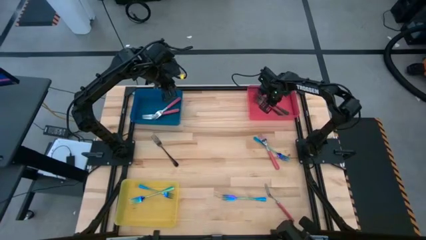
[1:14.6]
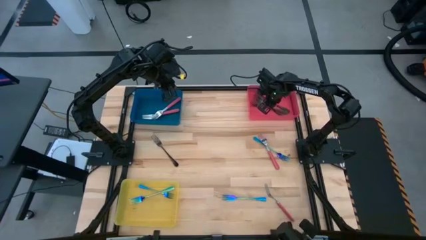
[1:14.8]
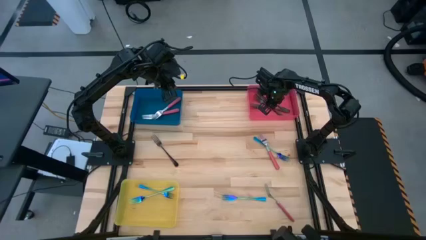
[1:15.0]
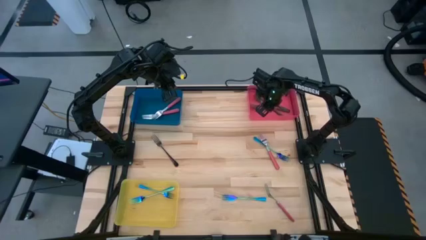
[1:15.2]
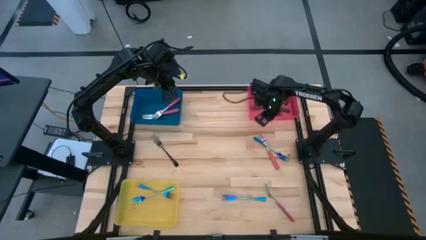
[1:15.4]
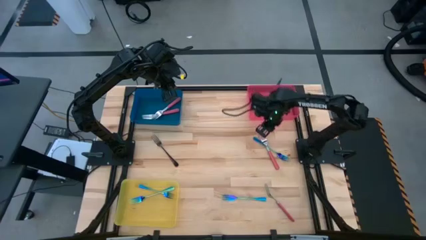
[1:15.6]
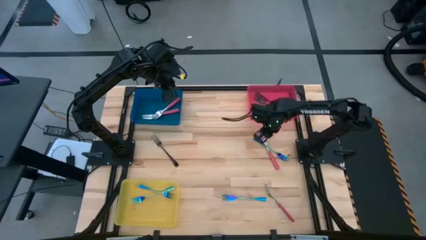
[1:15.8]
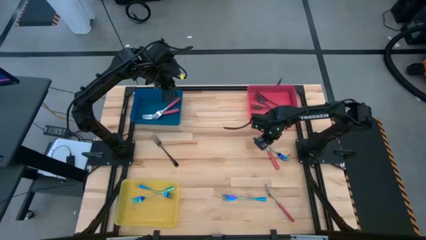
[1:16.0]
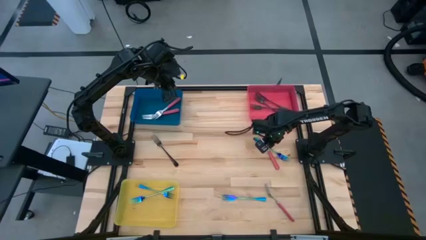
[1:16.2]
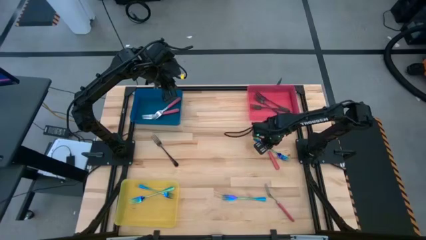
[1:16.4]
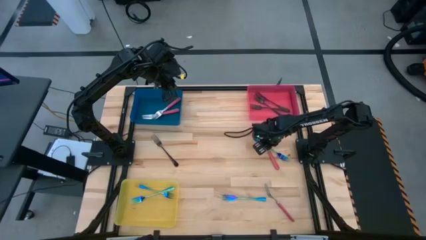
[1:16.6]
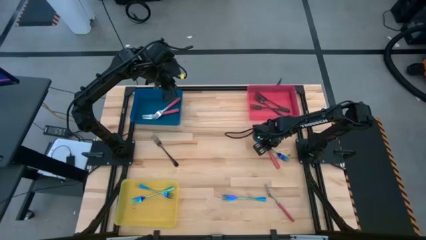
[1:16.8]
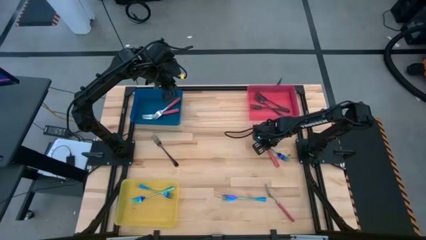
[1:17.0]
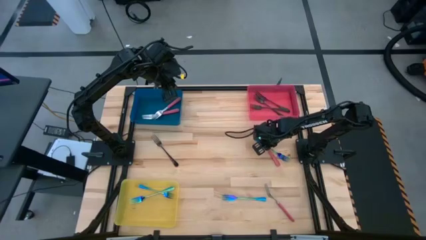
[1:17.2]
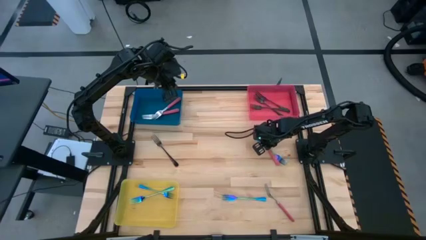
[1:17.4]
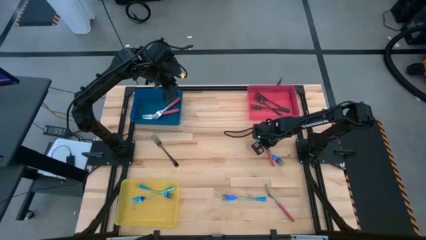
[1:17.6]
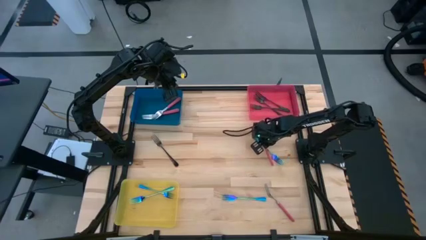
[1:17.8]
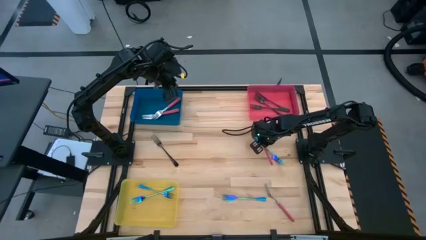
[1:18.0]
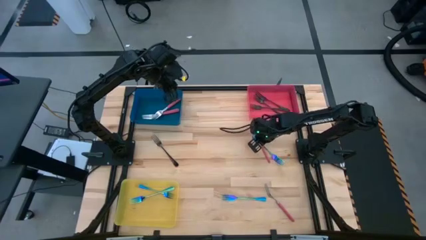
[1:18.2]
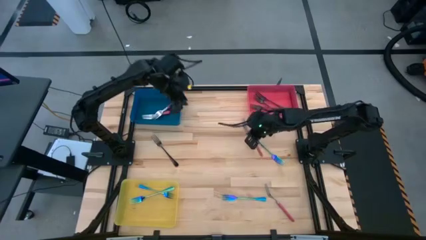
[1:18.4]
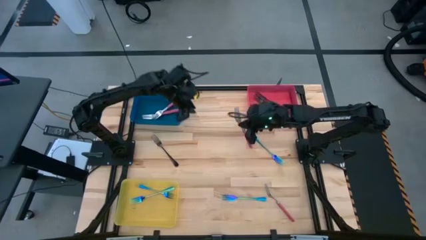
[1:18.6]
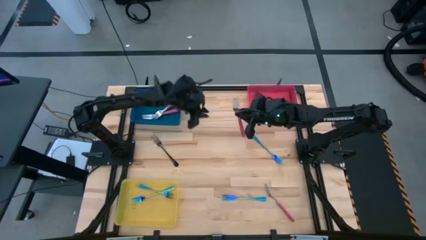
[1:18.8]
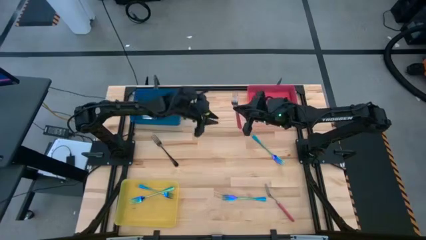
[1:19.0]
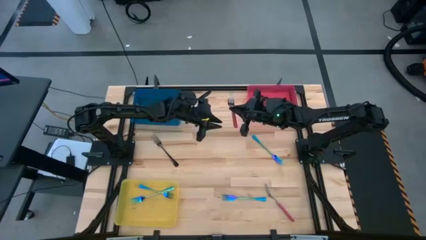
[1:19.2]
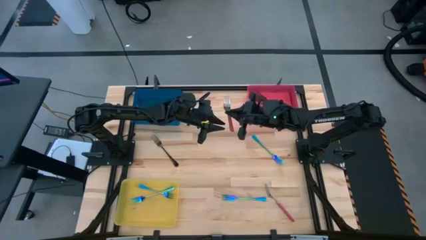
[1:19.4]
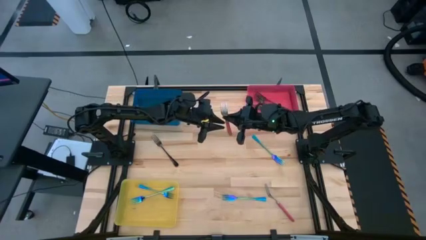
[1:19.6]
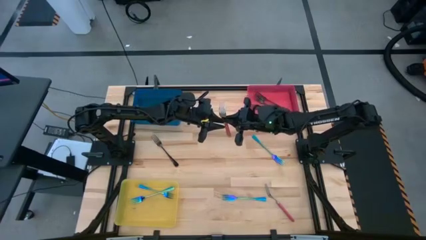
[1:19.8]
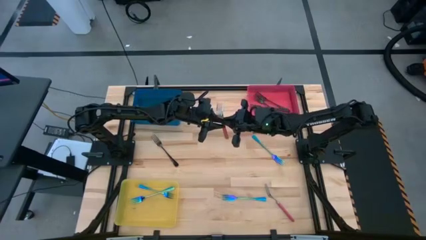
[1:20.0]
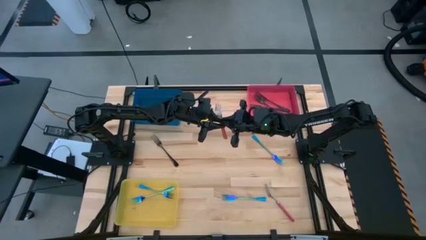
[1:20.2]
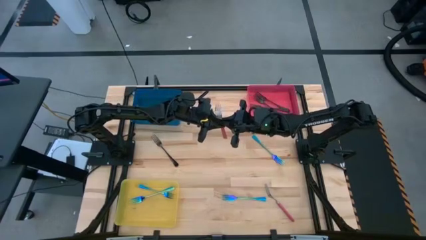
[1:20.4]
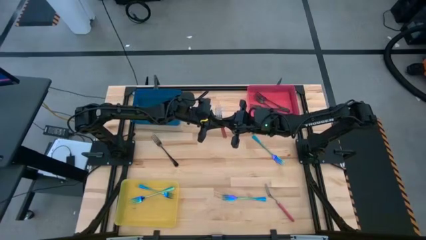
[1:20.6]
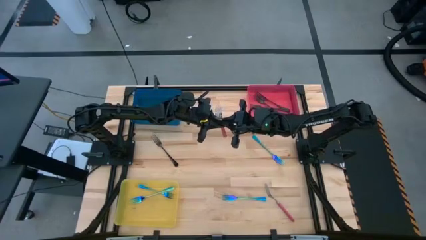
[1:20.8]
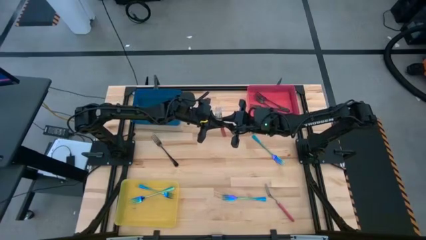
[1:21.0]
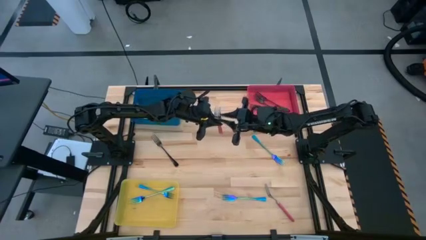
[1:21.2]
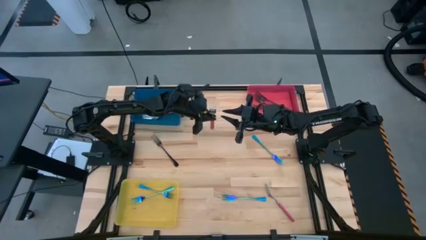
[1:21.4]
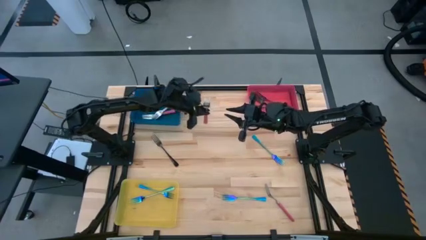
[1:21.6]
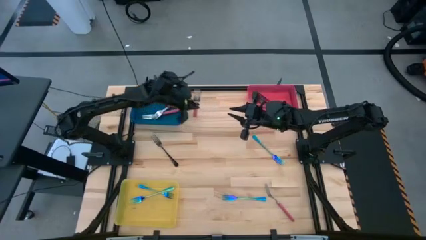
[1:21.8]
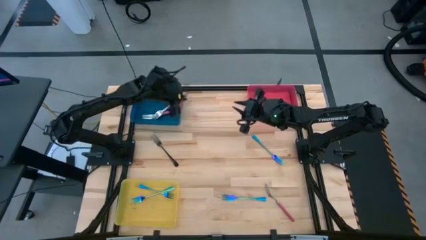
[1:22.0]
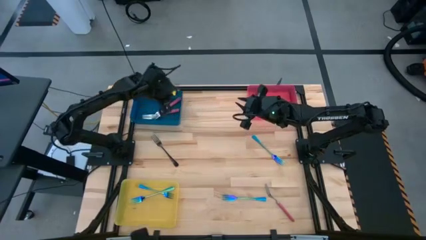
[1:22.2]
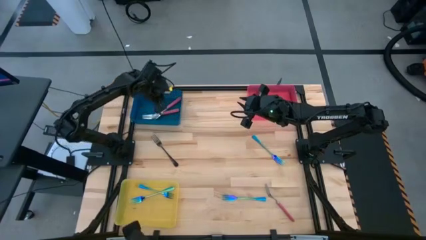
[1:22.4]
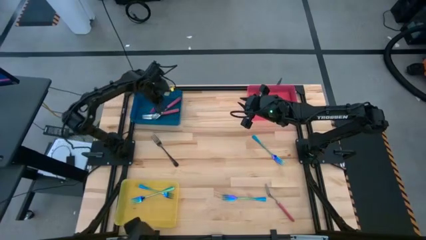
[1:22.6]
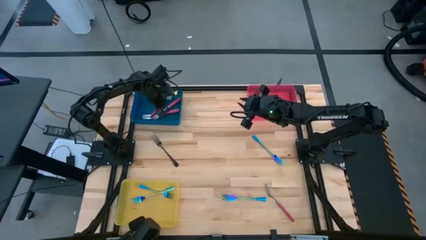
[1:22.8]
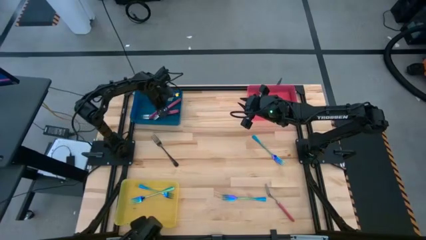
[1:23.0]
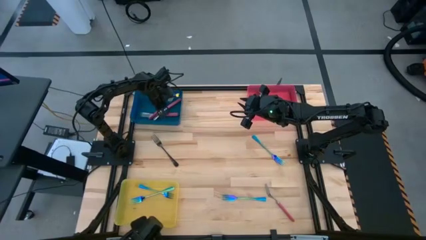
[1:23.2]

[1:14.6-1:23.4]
Task: Sort silverware by color (type)
Put the red fork into the blue bin

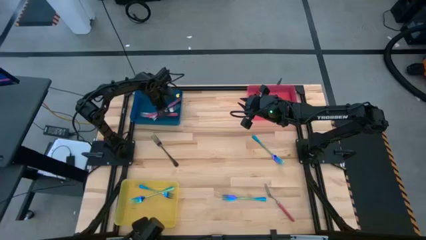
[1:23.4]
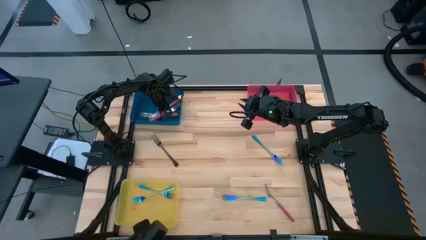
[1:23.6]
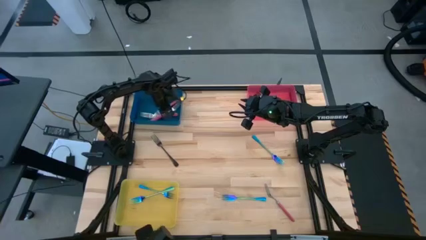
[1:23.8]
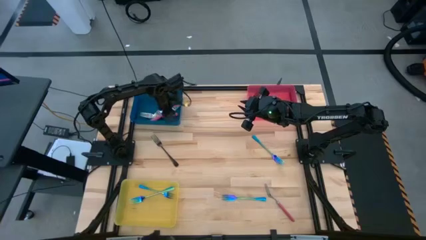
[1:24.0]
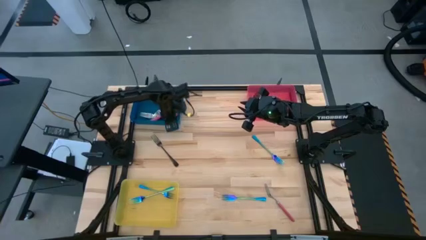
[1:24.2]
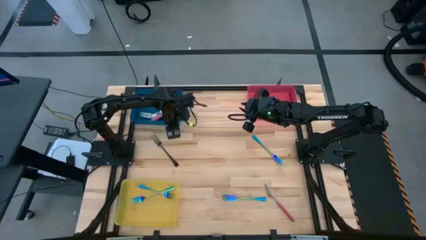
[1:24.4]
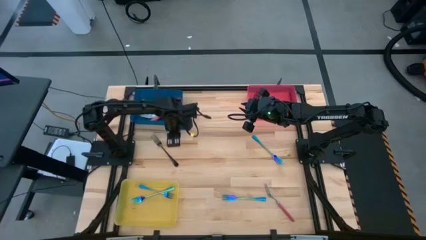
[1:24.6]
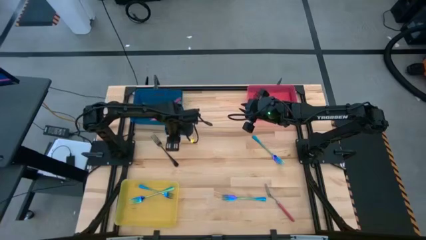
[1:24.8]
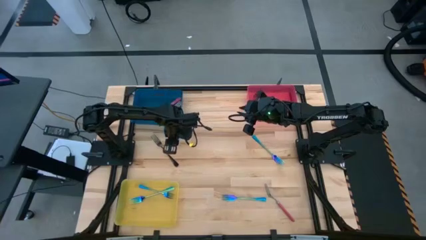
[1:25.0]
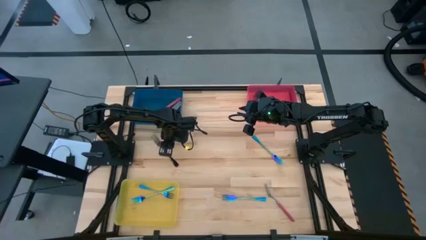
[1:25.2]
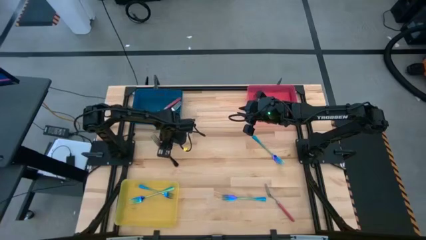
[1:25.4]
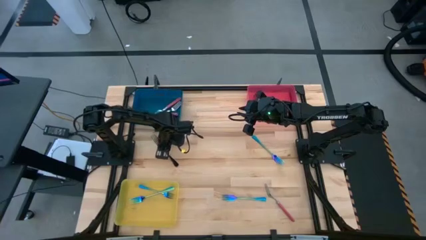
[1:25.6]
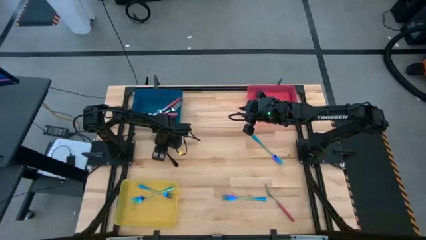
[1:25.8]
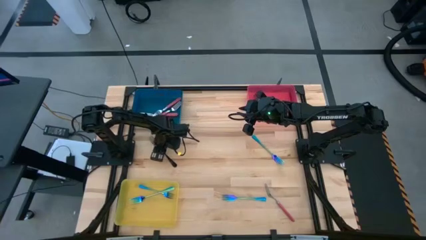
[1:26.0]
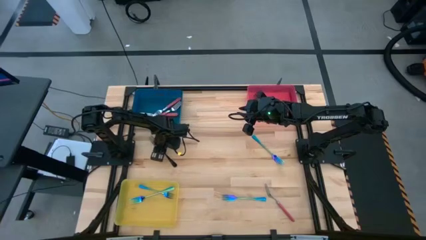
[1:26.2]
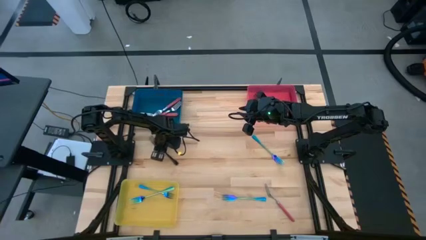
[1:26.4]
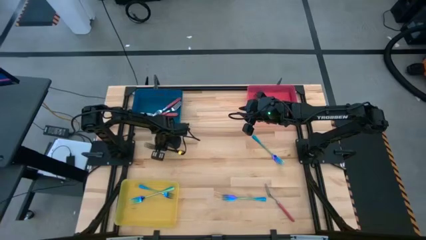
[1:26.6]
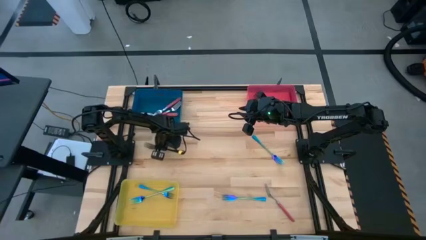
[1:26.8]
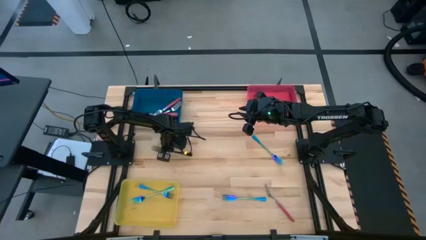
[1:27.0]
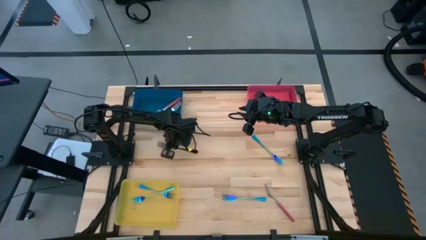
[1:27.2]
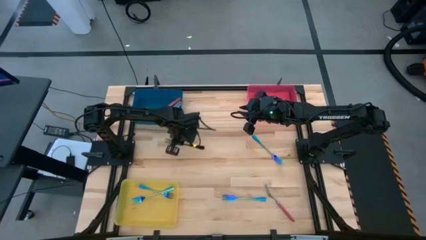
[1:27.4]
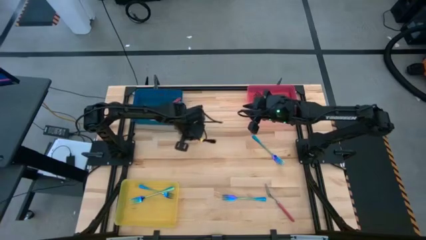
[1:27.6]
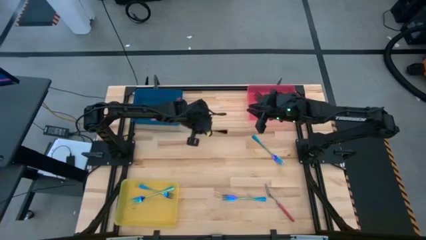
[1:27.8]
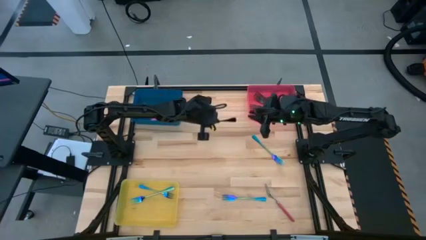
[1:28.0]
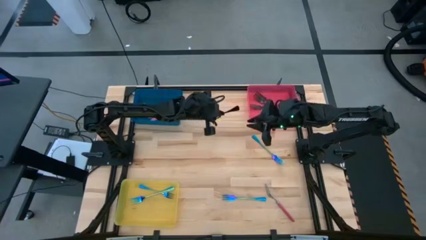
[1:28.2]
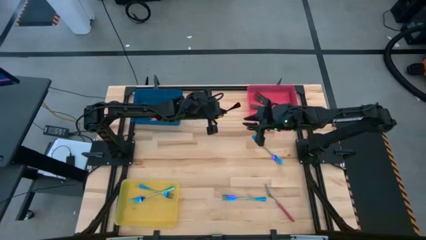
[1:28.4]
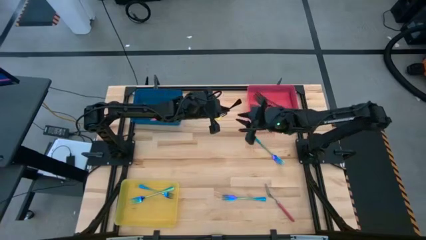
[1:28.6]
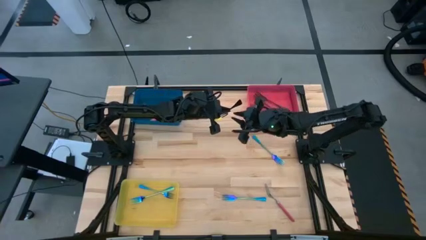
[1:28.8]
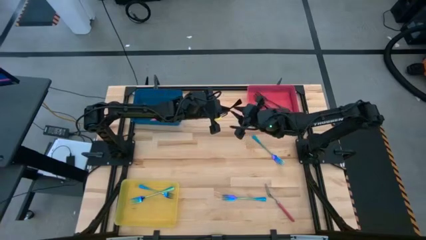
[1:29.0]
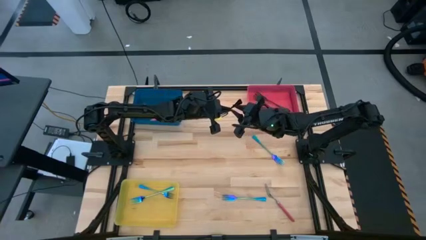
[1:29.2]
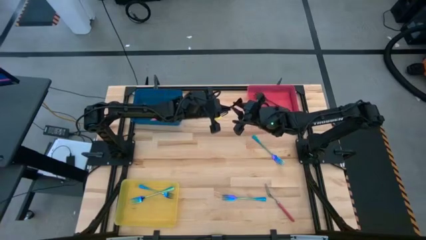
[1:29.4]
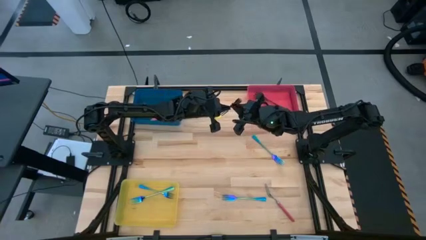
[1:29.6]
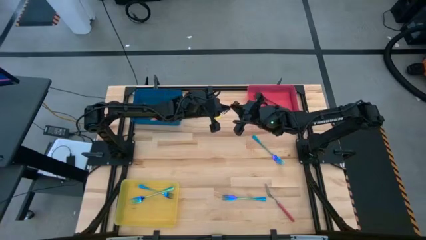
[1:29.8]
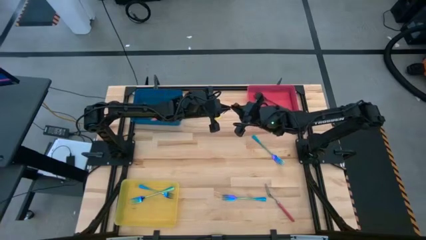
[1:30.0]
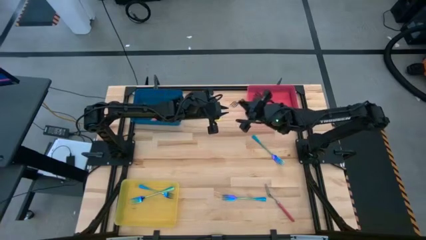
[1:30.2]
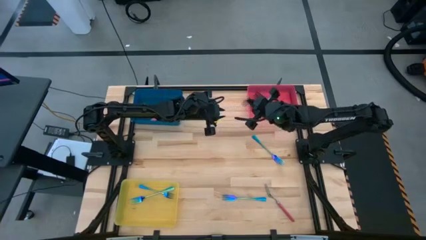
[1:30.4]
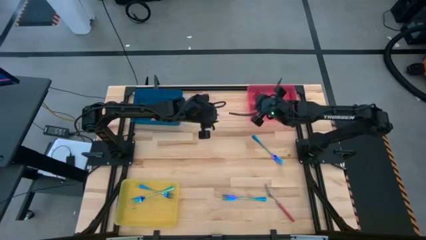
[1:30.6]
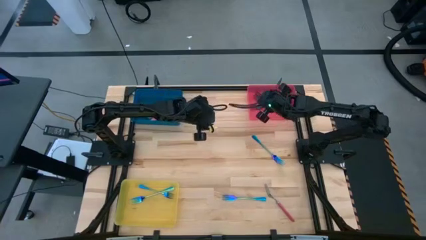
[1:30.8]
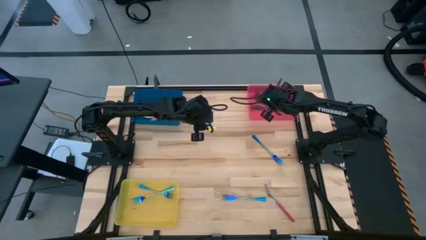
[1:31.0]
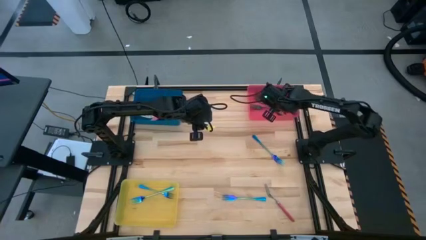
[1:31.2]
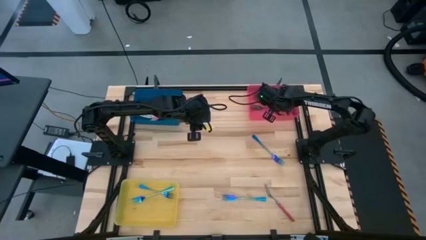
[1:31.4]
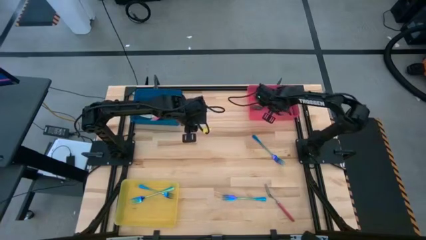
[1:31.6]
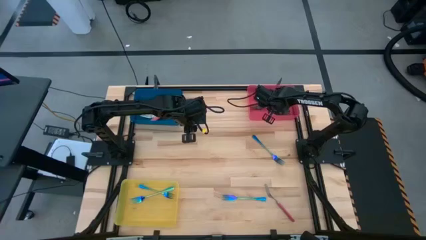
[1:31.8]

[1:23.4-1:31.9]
Put the black fork into the red bin
